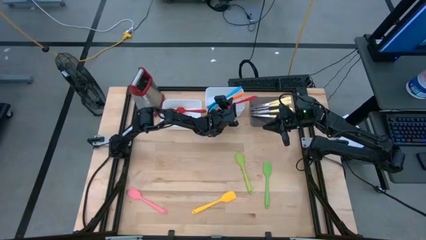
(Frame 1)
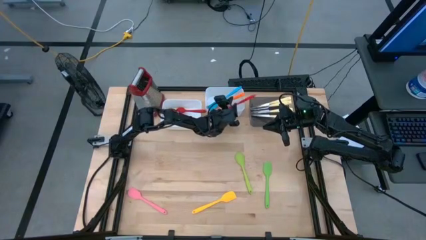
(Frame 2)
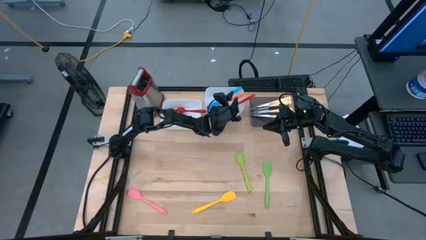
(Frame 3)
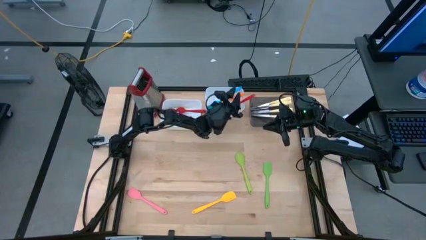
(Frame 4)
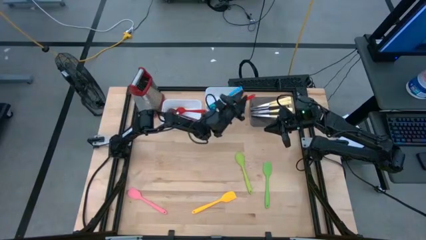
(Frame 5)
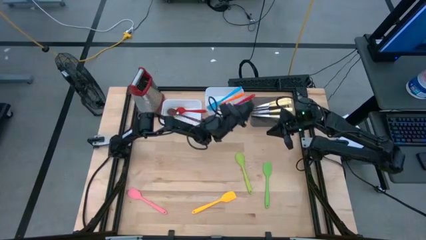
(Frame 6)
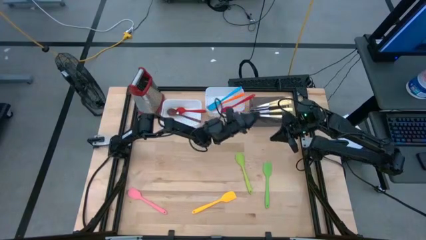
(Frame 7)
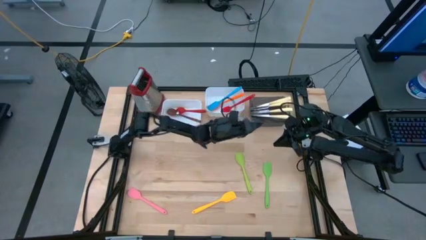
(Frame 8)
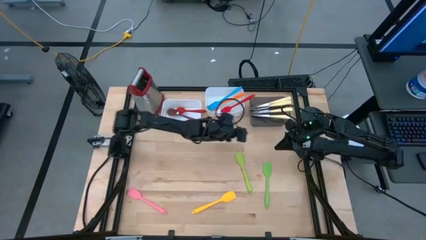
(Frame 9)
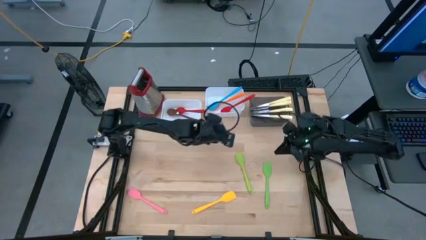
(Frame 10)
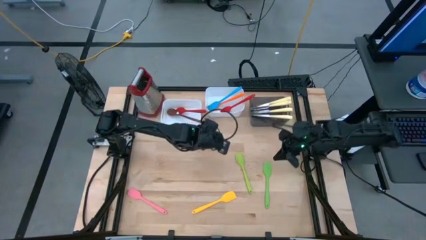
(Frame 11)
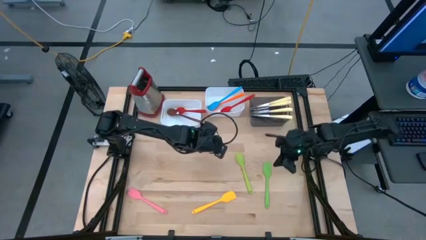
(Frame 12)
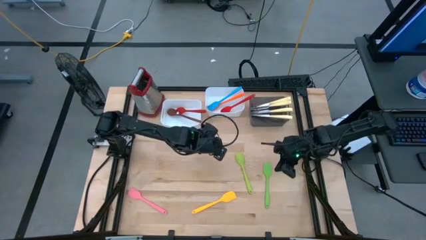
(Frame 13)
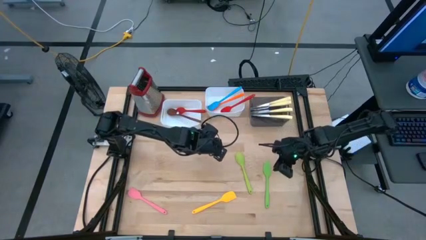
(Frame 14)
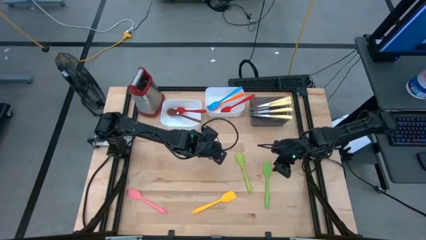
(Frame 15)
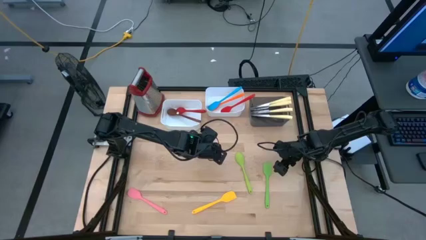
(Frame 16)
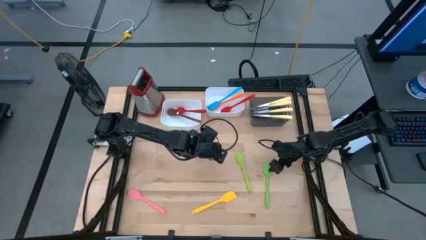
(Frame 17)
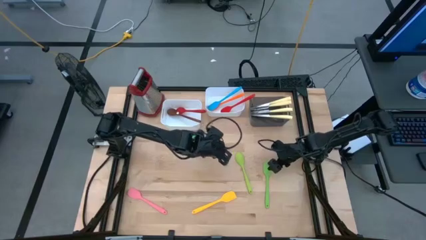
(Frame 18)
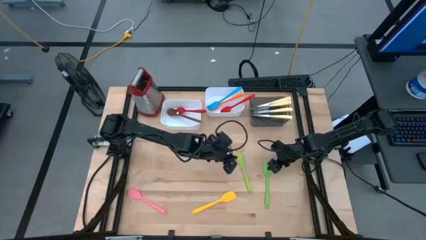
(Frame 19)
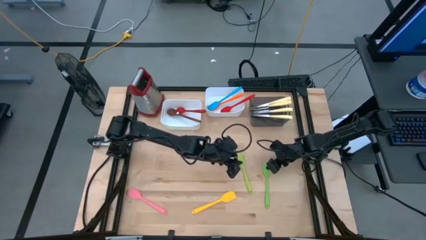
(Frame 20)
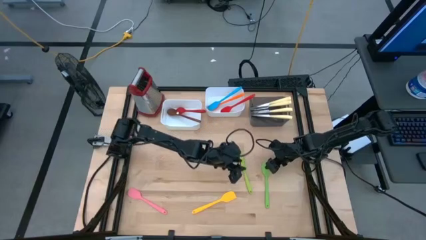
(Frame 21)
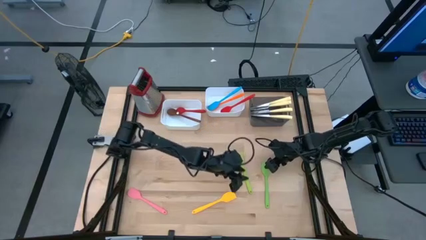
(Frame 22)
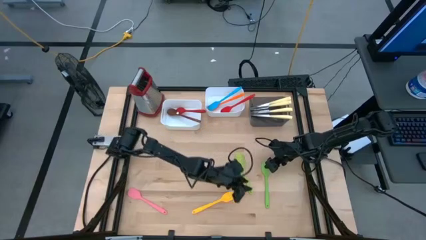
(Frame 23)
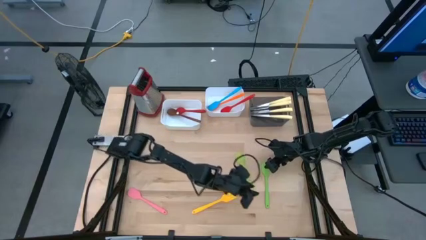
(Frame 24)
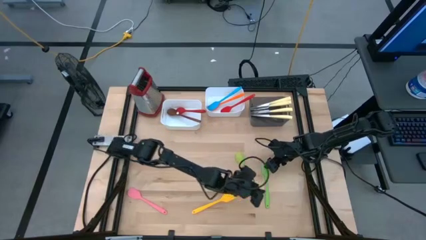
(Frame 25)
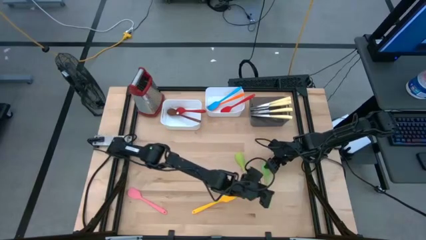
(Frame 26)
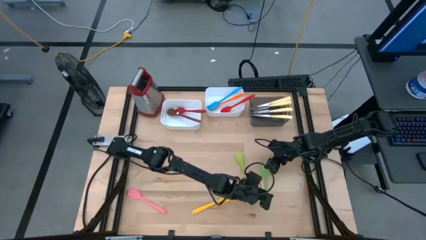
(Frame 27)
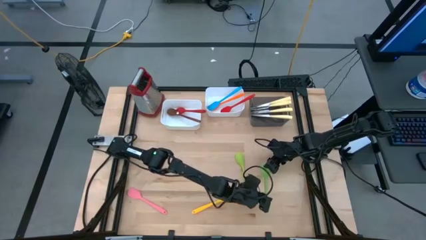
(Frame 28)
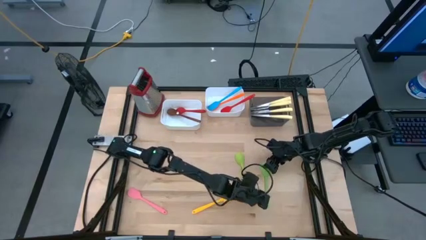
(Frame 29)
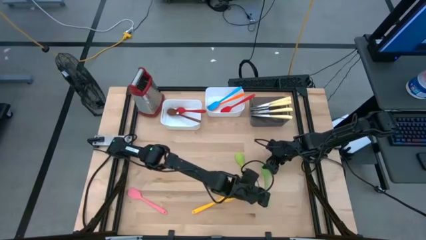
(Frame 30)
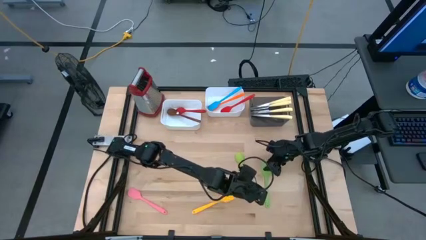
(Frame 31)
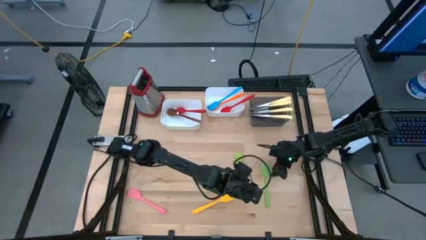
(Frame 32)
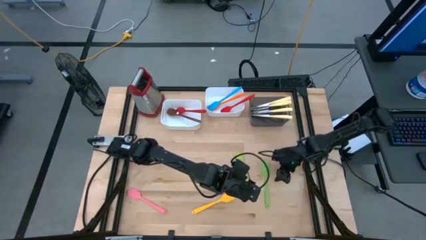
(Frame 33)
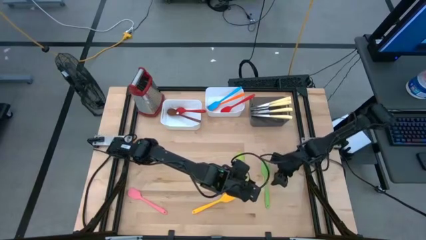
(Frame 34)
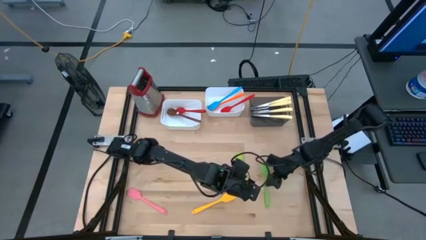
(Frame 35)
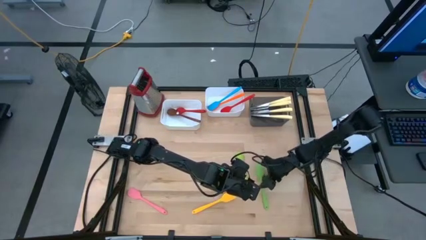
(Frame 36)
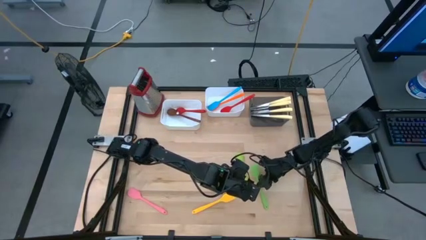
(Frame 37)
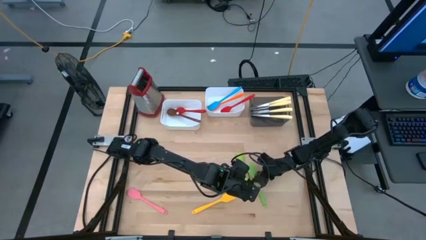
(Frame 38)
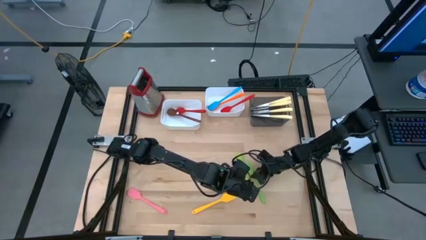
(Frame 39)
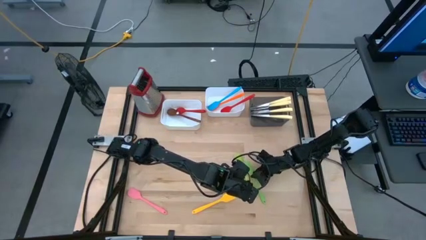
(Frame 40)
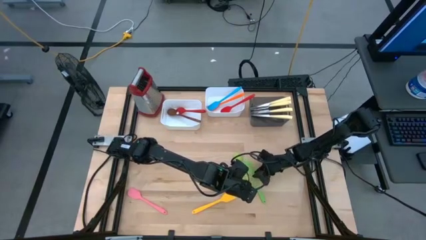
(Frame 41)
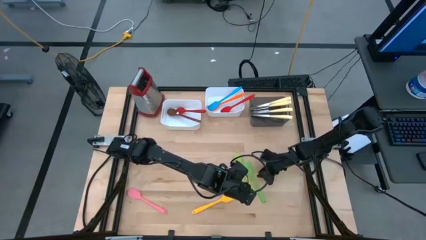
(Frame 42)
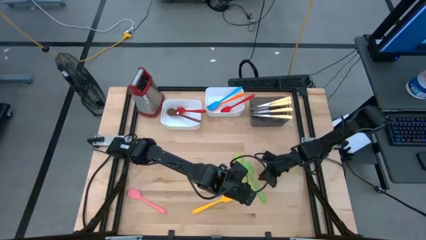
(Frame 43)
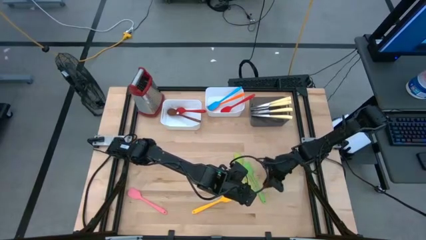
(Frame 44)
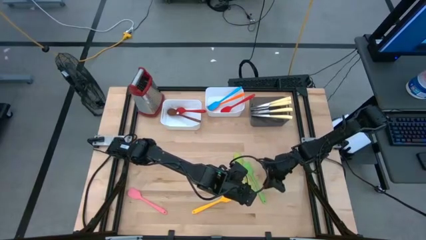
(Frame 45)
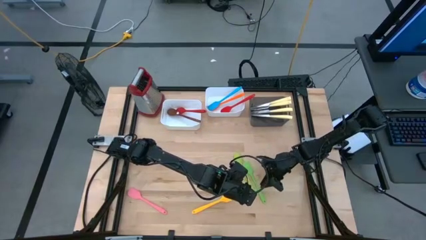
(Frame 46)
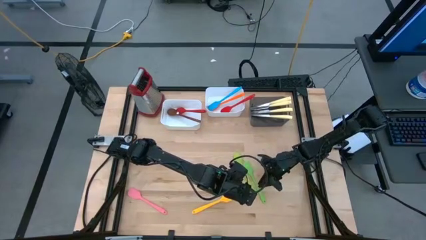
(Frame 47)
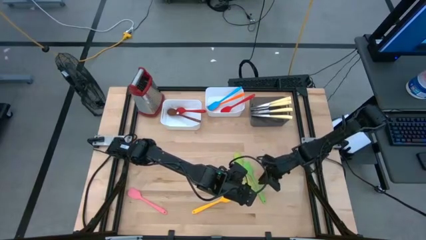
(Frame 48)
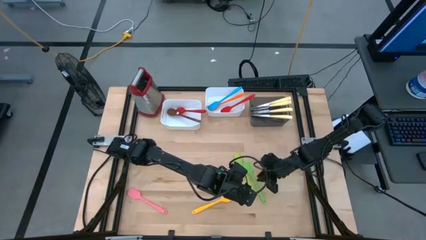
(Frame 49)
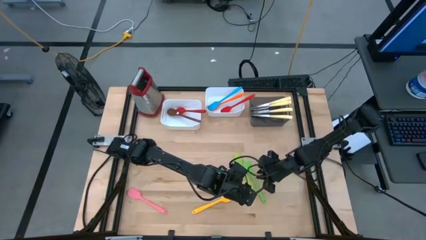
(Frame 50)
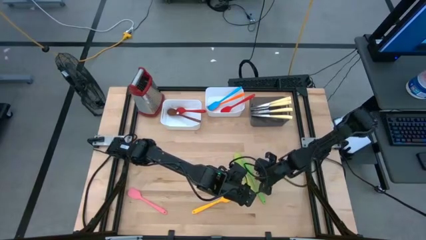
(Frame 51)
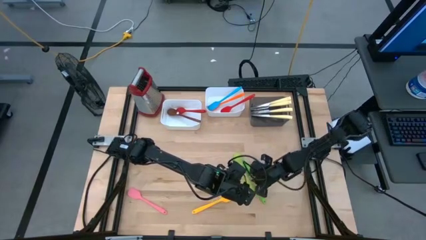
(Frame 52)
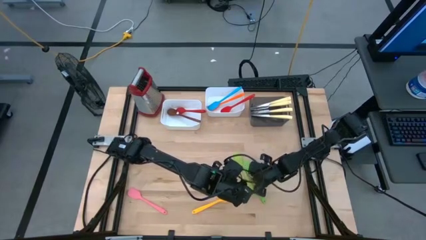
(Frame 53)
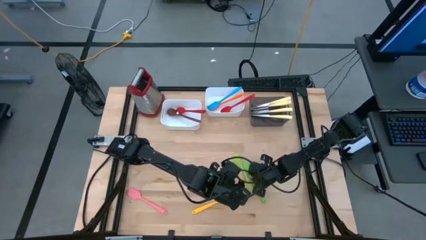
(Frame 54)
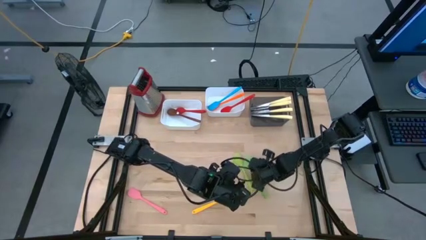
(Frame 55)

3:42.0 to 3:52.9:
Task: Pick & Place Kitchen Items
Put the green spatula into the right white bin
